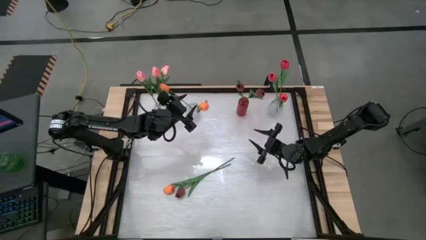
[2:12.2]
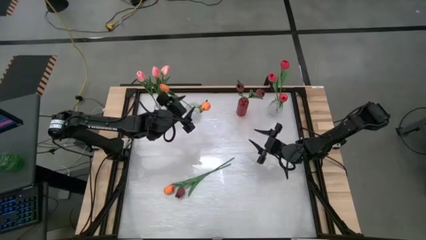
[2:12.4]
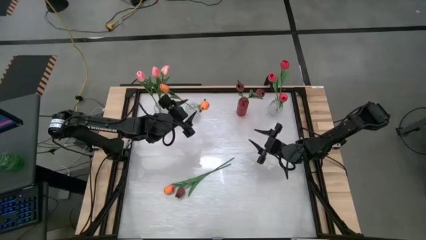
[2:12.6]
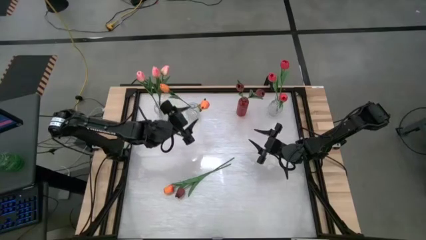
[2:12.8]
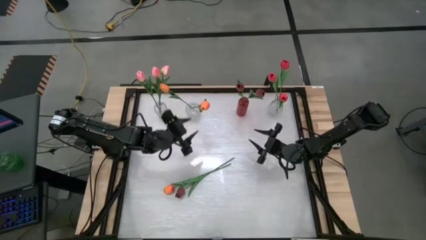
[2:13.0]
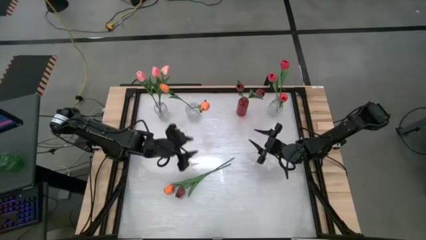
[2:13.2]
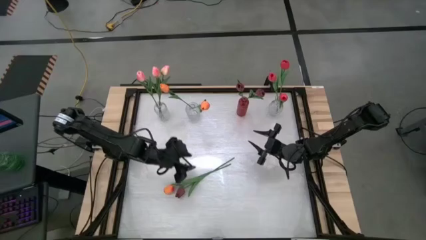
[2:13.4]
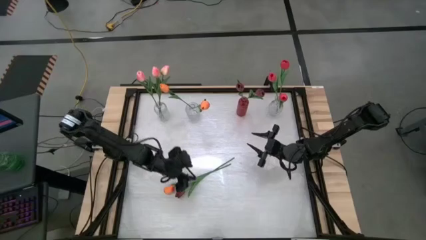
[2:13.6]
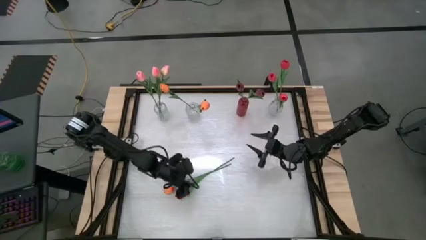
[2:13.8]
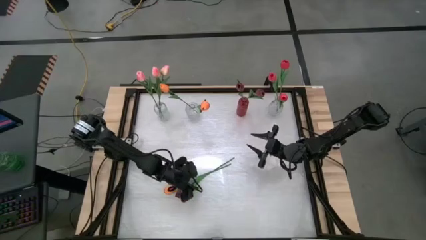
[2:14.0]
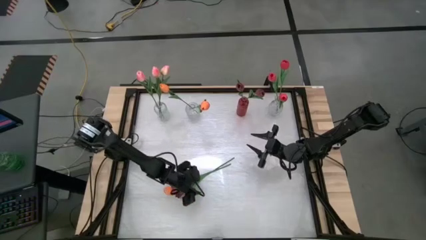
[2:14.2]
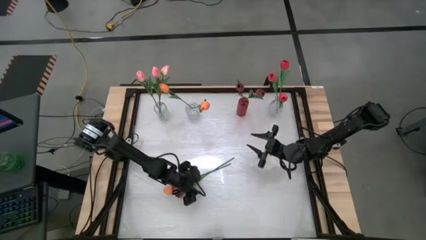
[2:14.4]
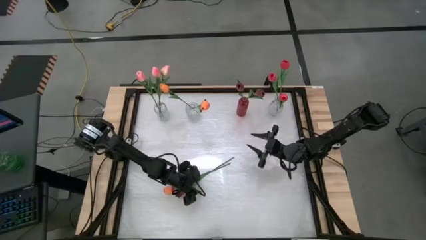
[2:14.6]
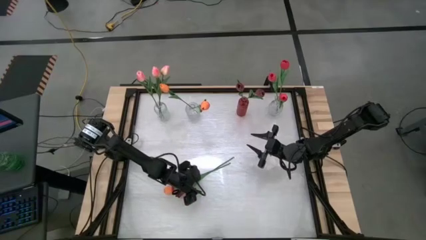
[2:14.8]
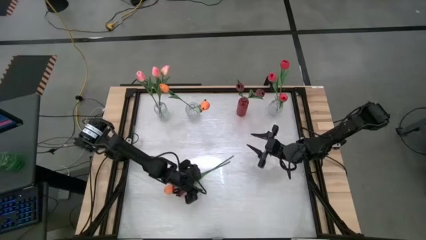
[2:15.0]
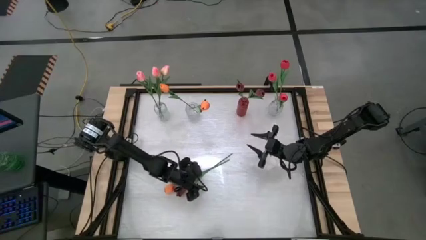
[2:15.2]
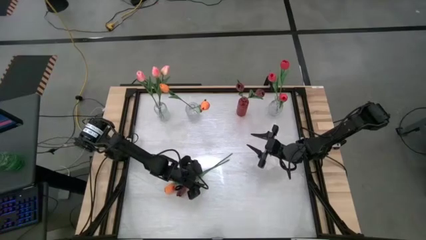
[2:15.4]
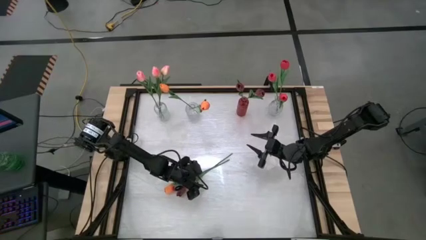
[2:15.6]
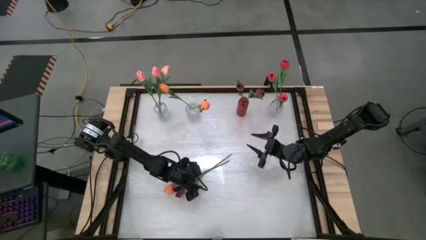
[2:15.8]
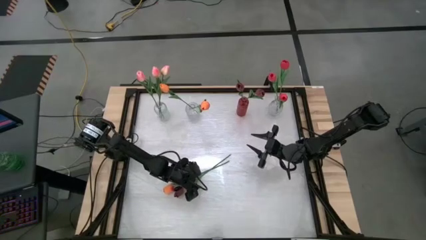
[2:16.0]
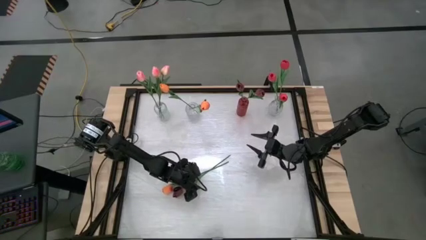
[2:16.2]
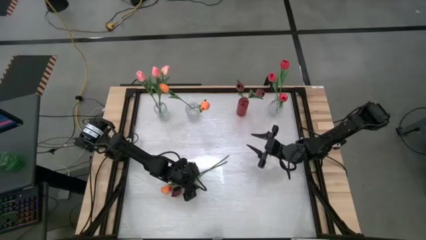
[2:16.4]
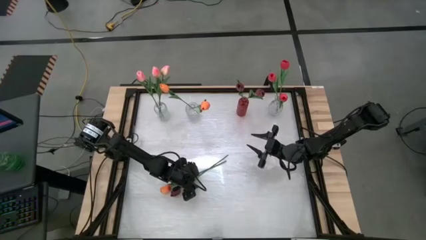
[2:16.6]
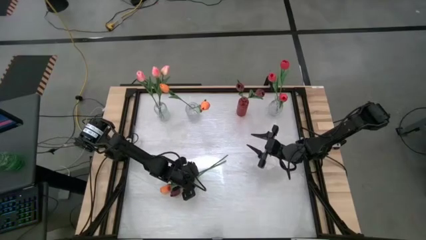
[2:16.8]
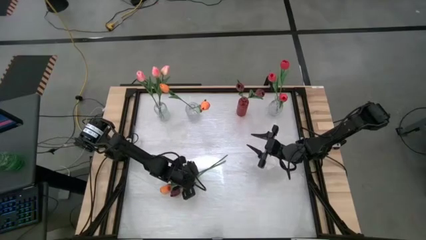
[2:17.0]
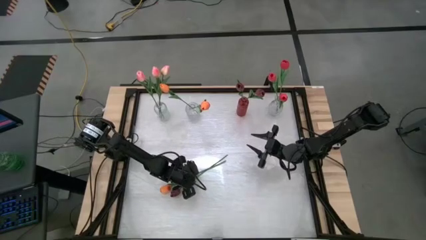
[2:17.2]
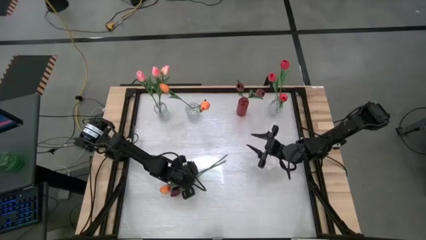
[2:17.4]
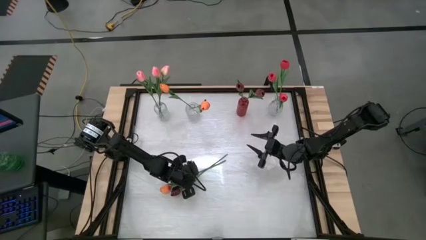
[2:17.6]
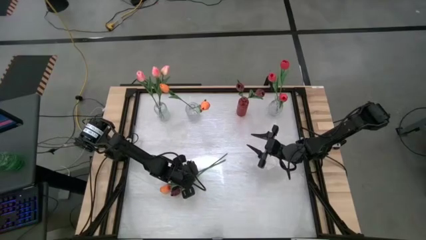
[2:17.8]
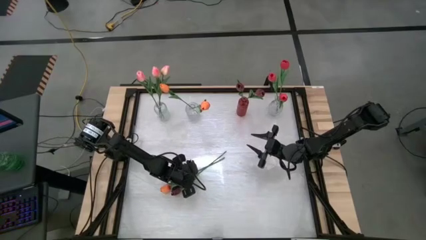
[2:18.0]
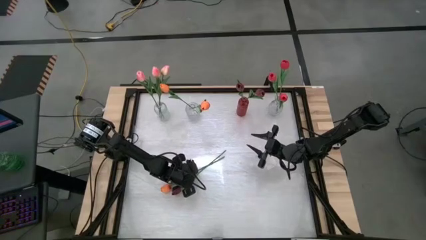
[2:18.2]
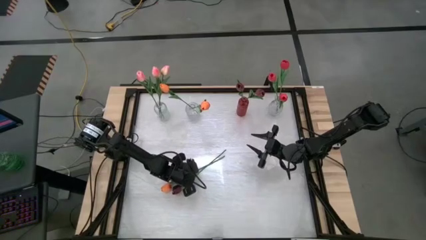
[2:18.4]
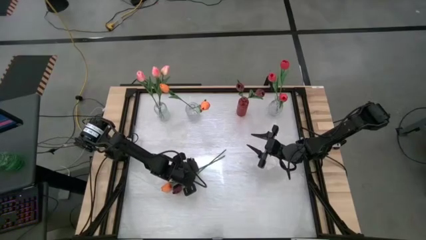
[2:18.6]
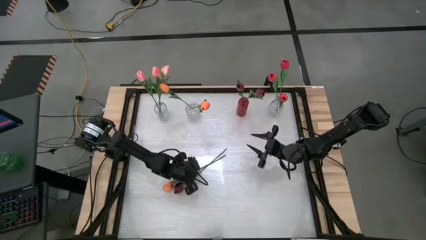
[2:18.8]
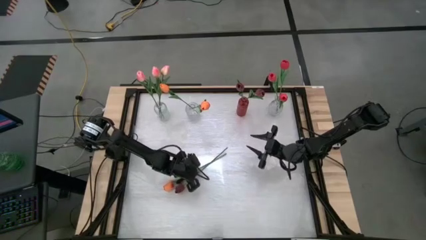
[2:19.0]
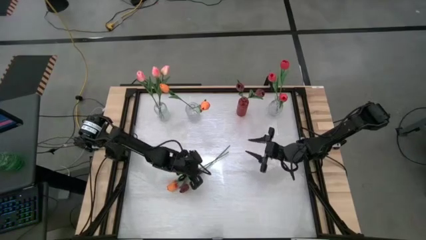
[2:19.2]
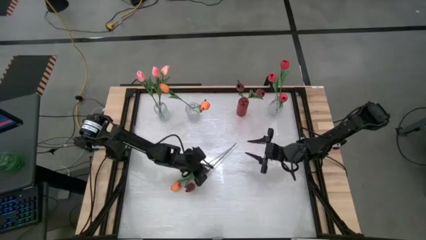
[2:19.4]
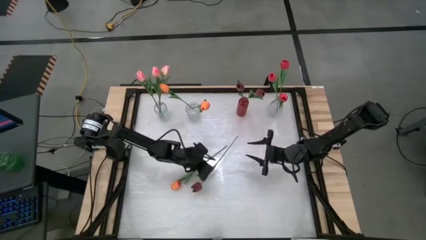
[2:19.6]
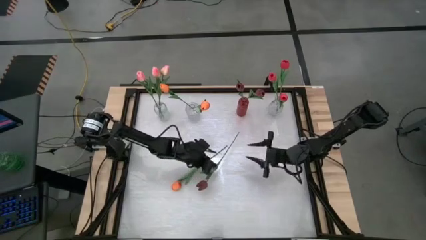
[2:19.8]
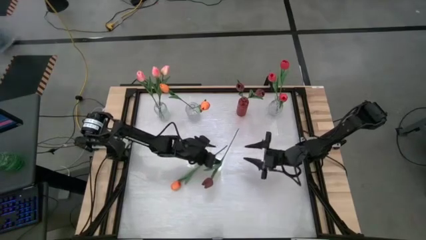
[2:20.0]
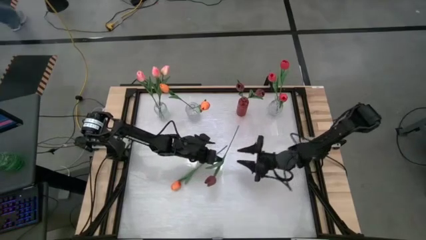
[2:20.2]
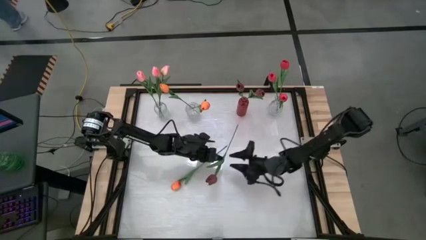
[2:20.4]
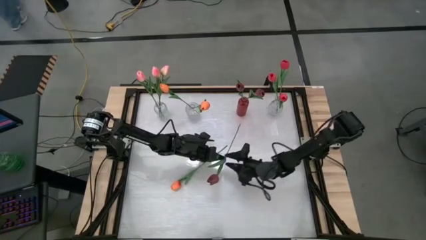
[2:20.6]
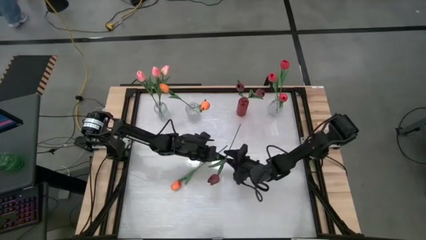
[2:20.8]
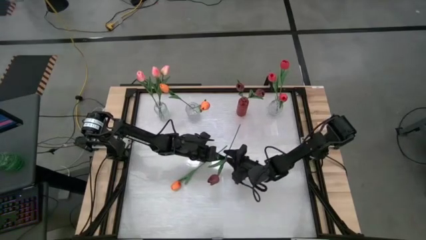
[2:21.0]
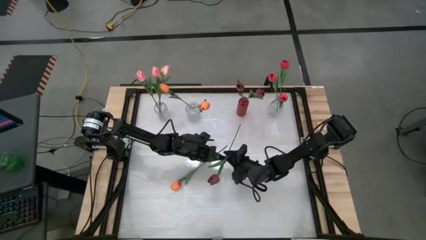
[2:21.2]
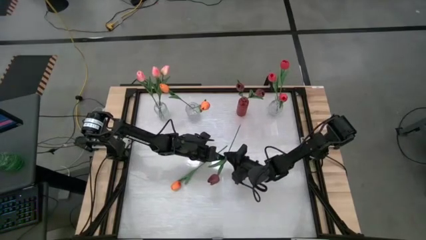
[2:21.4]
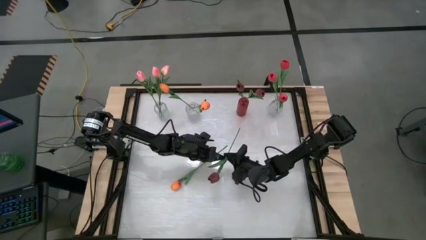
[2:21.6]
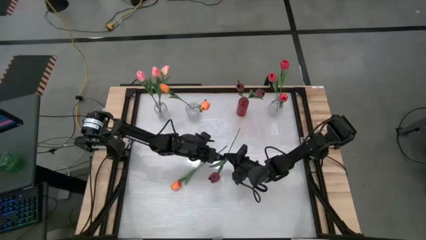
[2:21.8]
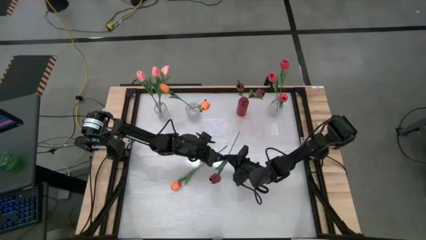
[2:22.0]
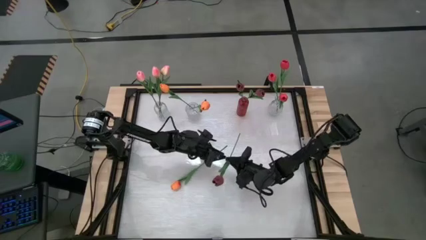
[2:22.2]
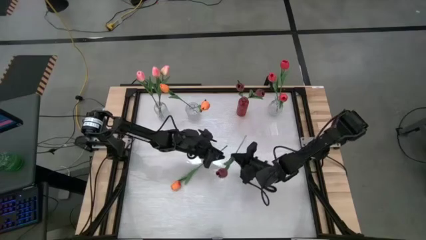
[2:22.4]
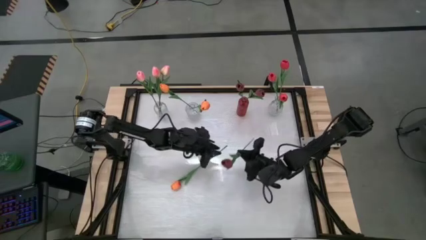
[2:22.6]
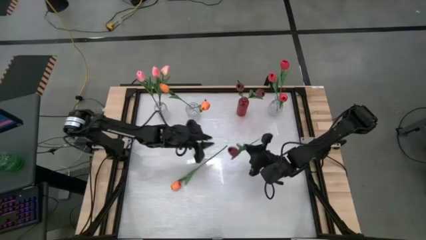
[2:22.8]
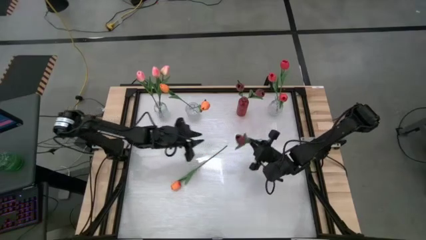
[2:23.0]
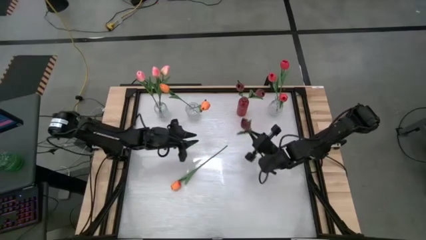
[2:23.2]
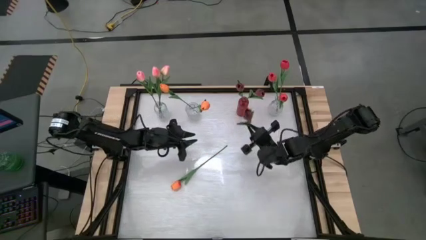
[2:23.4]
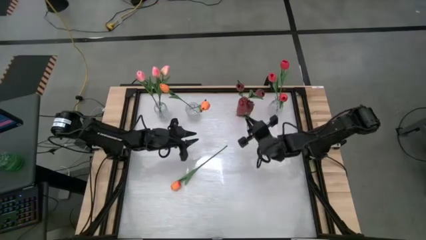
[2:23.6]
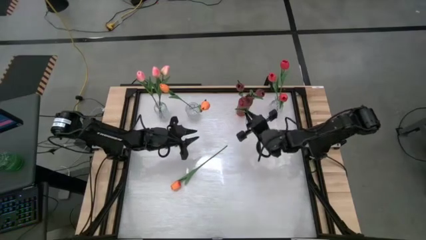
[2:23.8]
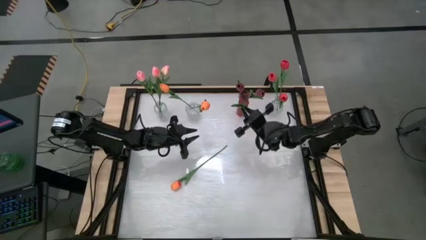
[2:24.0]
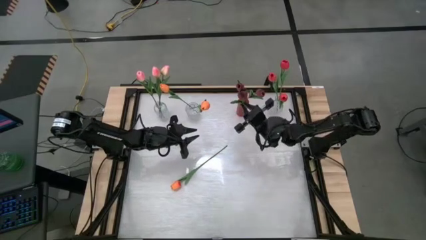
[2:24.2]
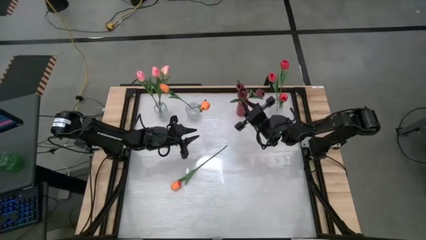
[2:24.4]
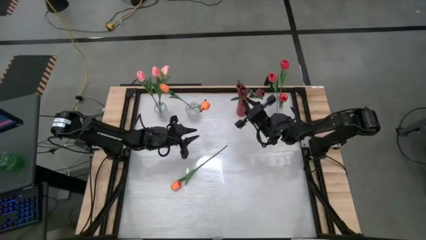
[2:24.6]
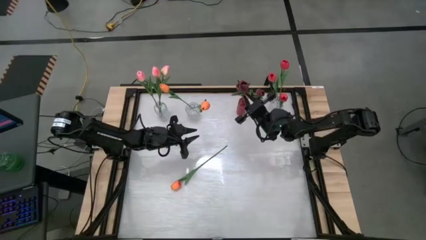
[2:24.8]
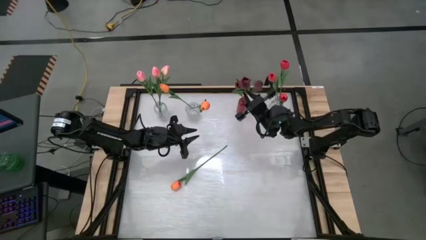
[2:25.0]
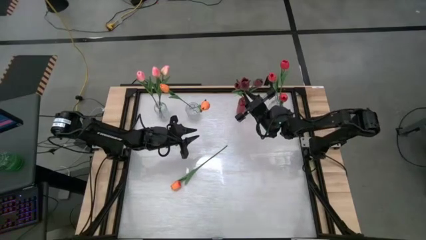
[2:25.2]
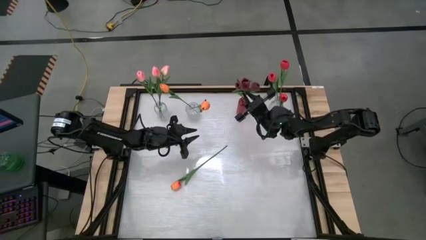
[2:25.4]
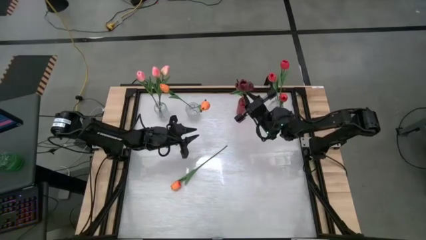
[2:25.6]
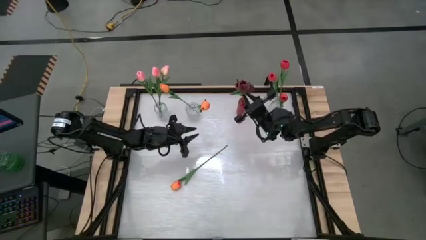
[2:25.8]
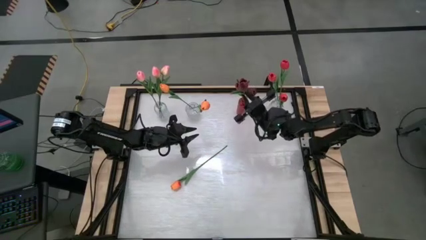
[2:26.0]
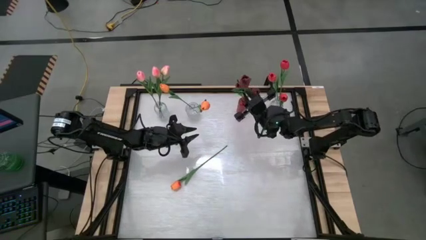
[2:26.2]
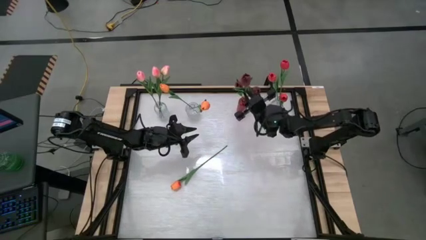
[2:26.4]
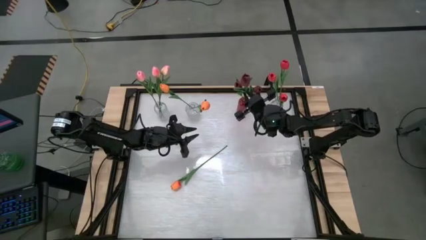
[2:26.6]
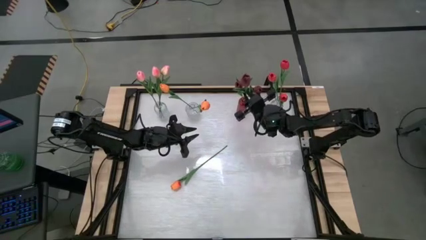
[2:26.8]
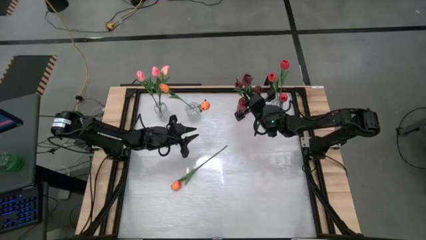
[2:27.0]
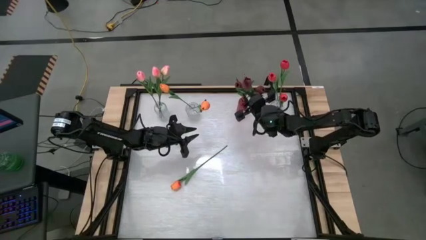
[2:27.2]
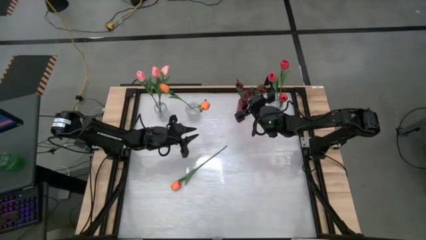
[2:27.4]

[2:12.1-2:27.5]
Task: Sort flowers into vase by color
Put the red flower into the right red vase

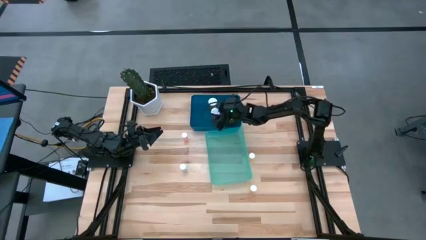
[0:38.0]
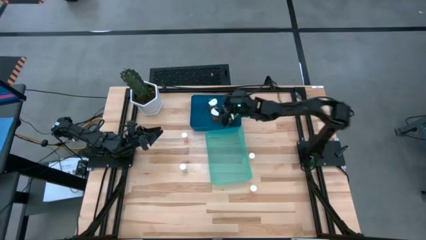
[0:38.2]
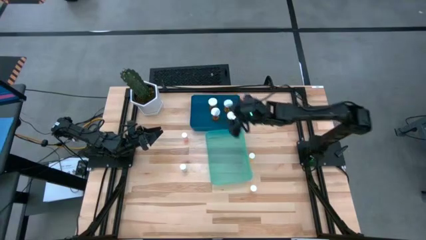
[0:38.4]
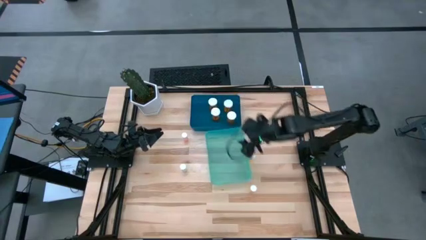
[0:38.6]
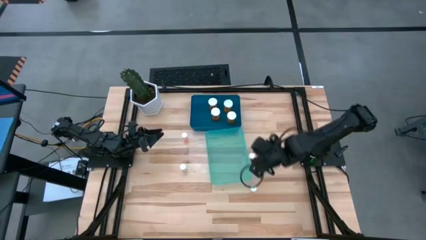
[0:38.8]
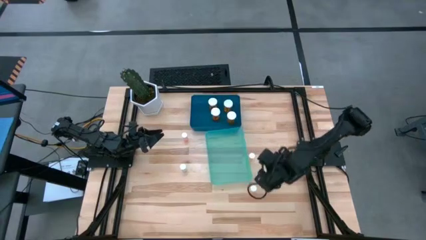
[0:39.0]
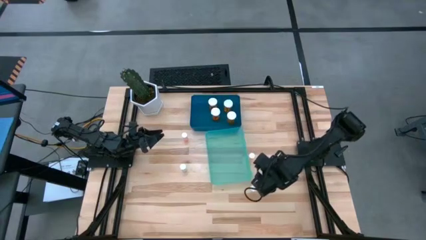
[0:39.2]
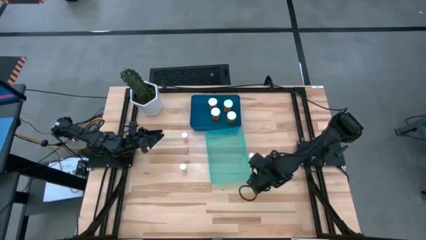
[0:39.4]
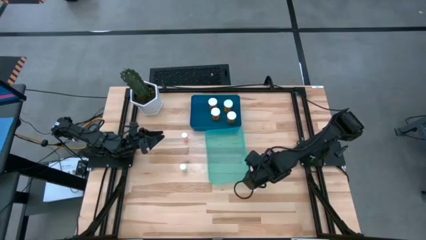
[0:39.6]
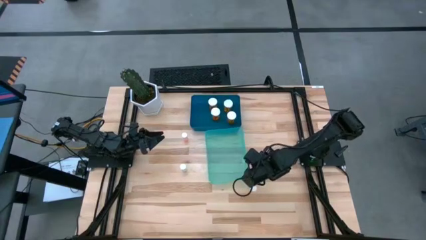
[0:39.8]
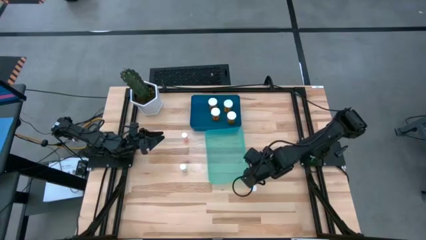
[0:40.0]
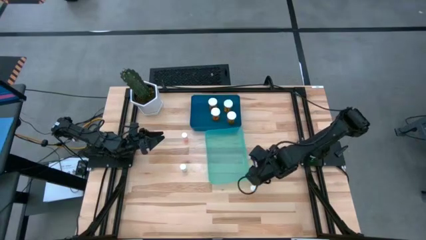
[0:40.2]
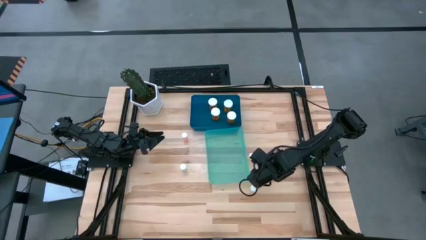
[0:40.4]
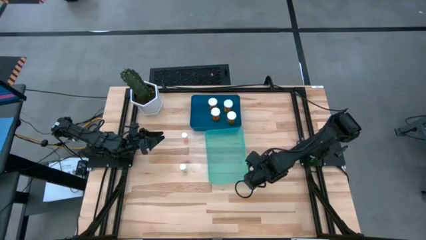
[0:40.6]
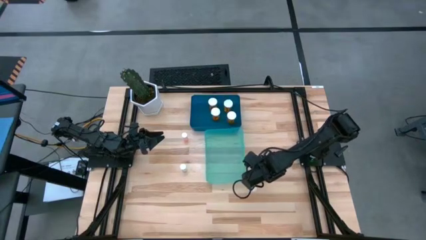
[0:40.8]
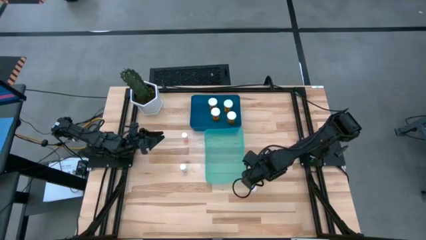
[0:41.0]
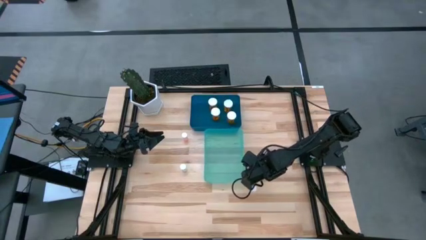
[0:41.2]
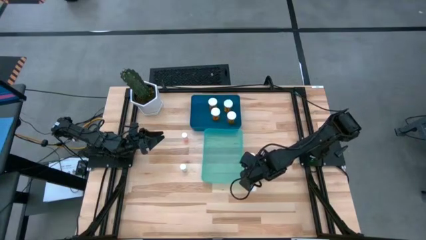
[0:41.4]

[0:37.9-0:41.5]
Task: Pick and place medicine bottles into bin by pill shape (circle, oval)
Adjust the green bin on the table
